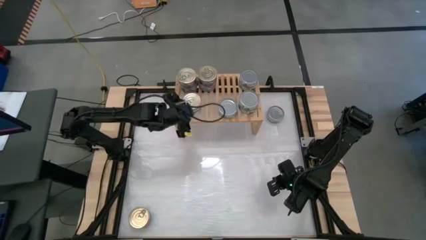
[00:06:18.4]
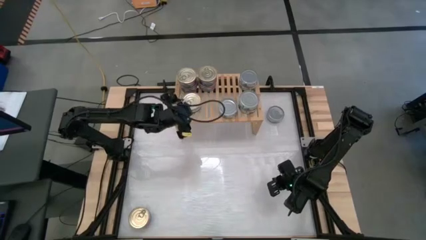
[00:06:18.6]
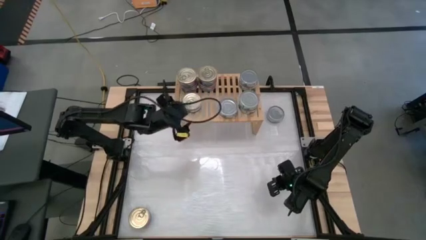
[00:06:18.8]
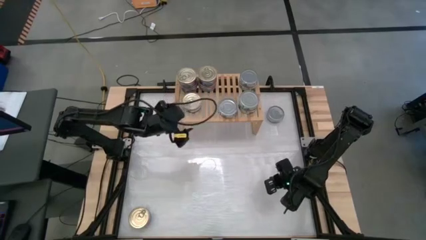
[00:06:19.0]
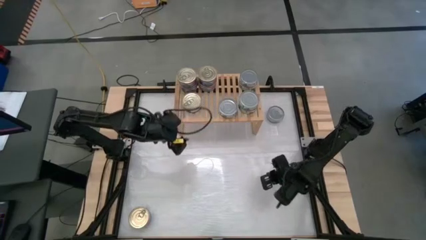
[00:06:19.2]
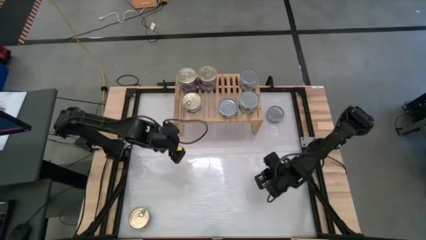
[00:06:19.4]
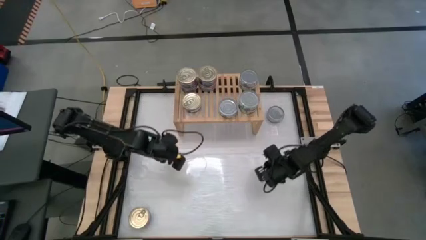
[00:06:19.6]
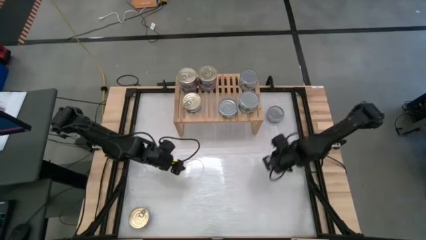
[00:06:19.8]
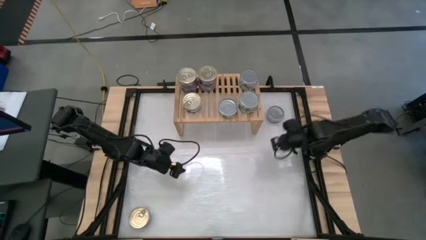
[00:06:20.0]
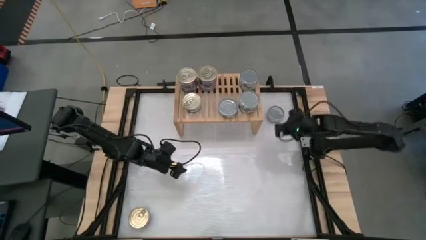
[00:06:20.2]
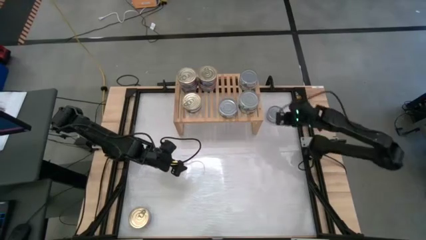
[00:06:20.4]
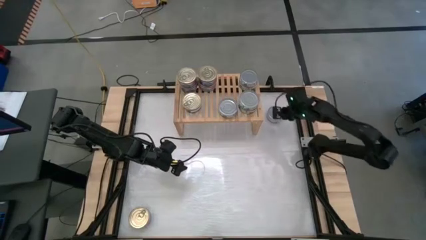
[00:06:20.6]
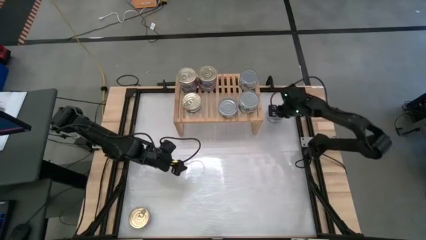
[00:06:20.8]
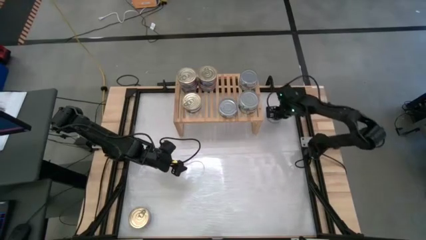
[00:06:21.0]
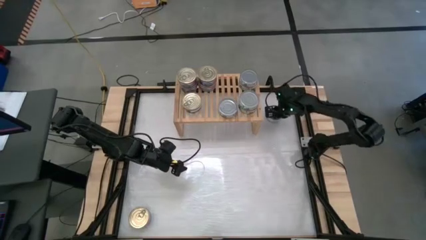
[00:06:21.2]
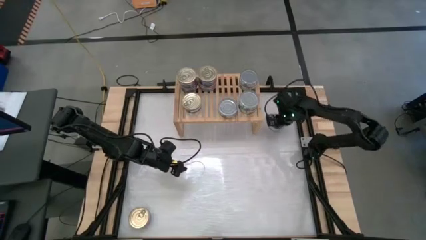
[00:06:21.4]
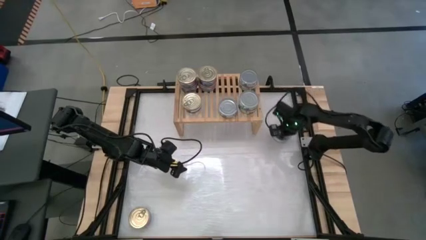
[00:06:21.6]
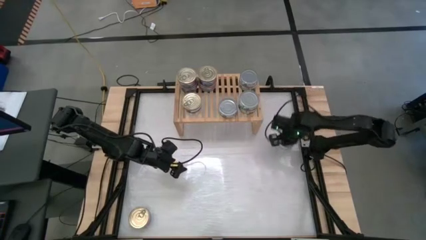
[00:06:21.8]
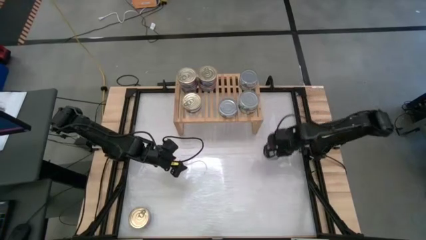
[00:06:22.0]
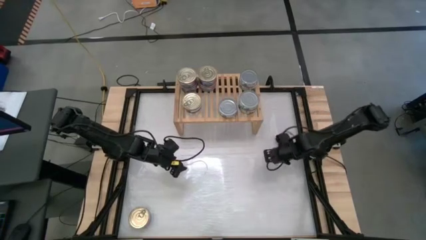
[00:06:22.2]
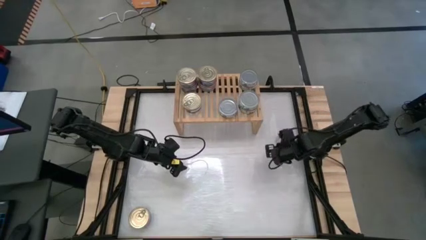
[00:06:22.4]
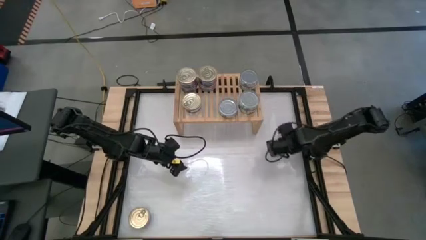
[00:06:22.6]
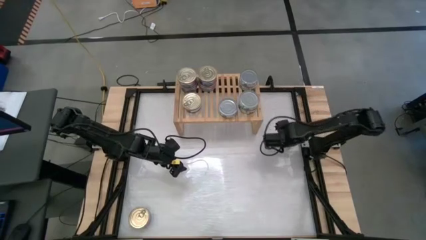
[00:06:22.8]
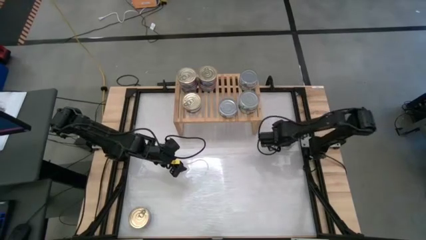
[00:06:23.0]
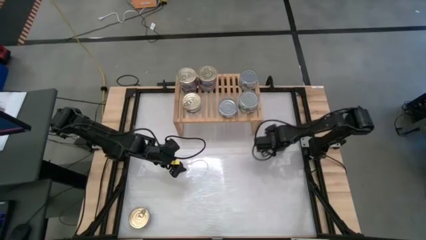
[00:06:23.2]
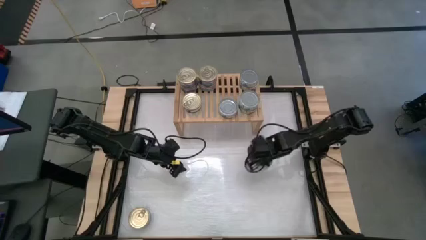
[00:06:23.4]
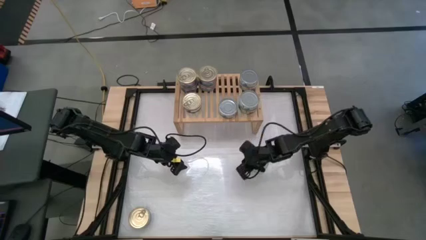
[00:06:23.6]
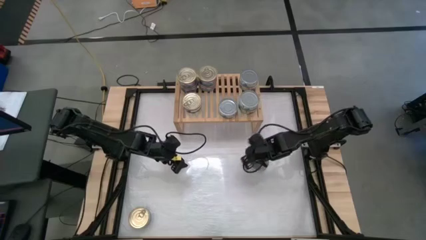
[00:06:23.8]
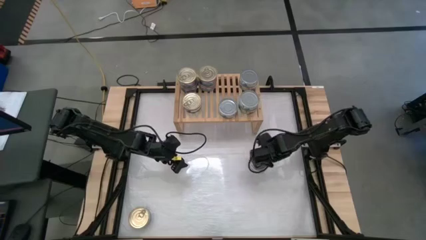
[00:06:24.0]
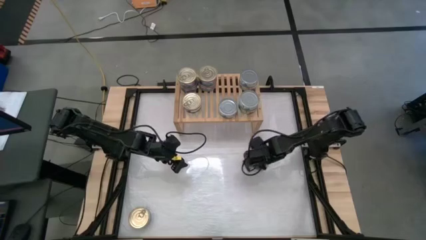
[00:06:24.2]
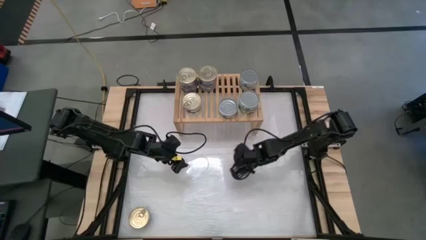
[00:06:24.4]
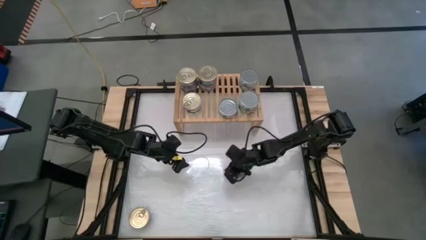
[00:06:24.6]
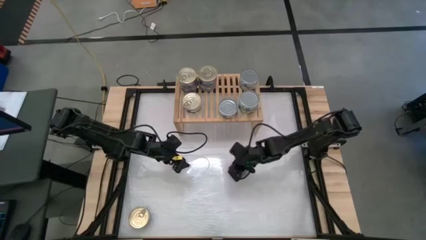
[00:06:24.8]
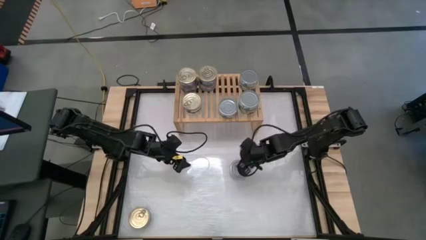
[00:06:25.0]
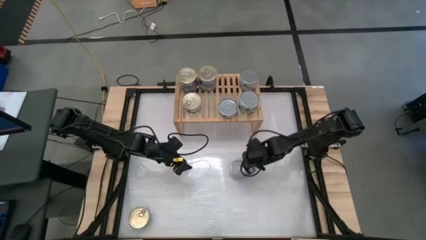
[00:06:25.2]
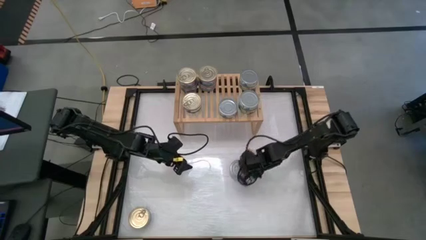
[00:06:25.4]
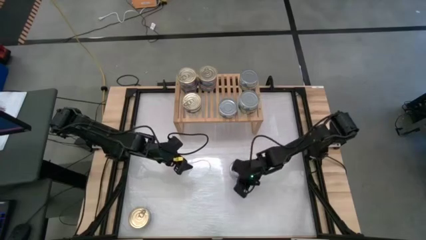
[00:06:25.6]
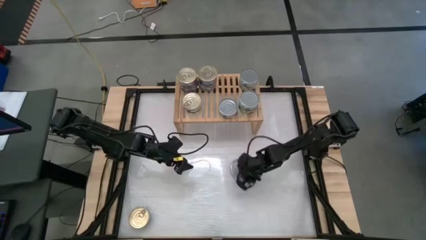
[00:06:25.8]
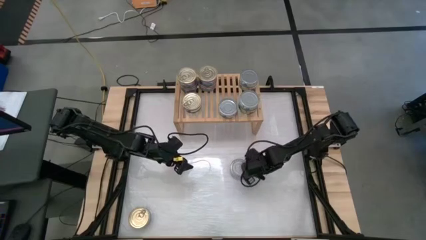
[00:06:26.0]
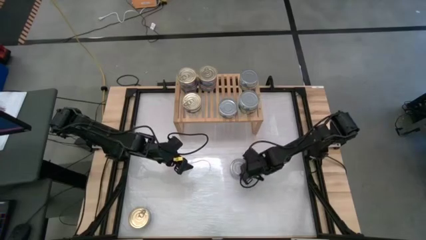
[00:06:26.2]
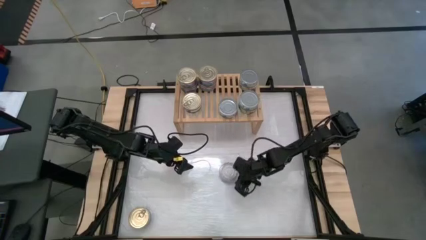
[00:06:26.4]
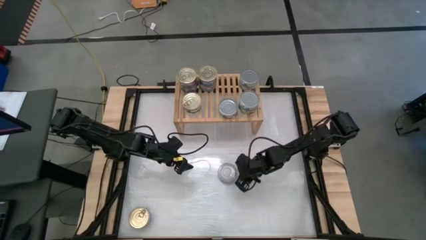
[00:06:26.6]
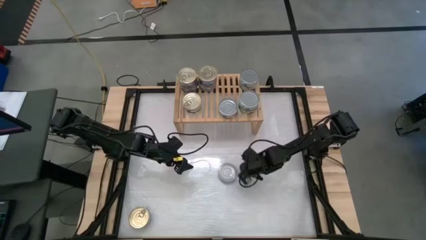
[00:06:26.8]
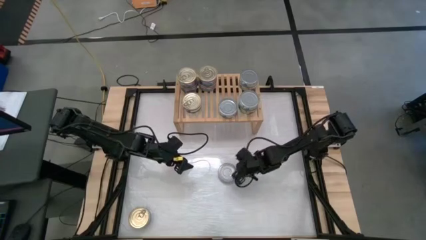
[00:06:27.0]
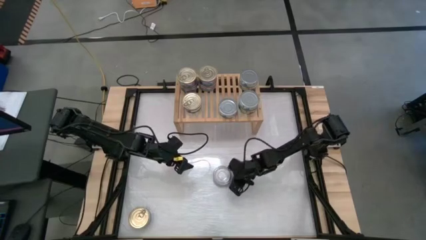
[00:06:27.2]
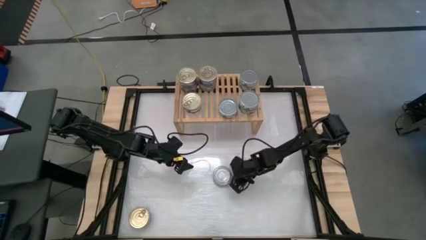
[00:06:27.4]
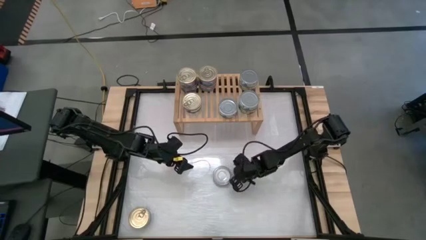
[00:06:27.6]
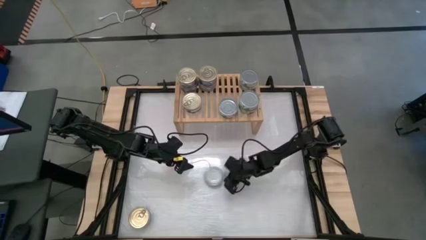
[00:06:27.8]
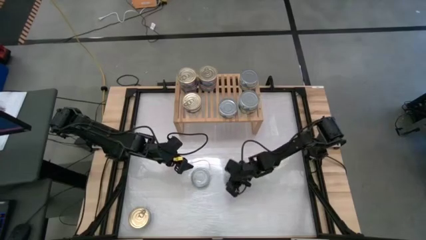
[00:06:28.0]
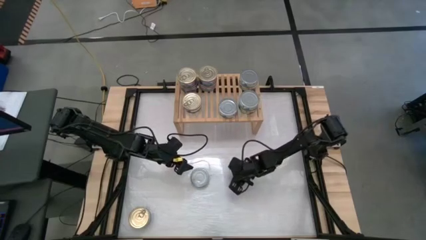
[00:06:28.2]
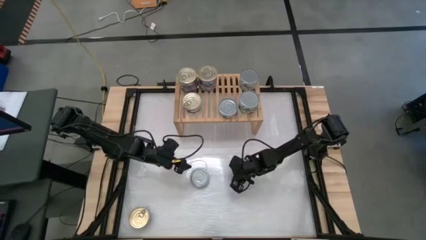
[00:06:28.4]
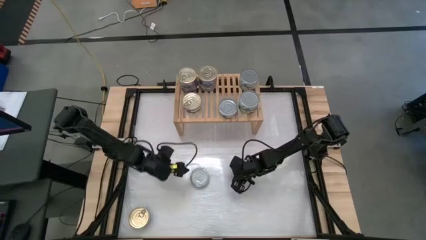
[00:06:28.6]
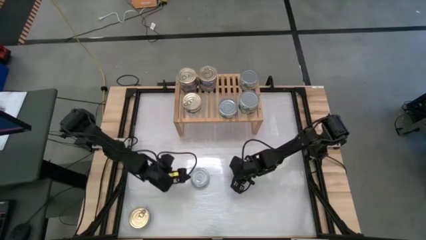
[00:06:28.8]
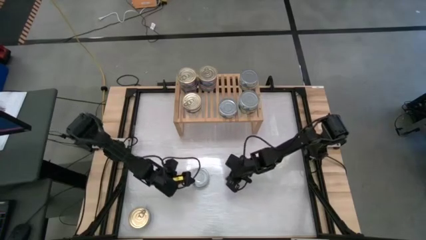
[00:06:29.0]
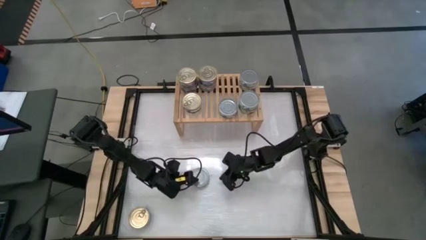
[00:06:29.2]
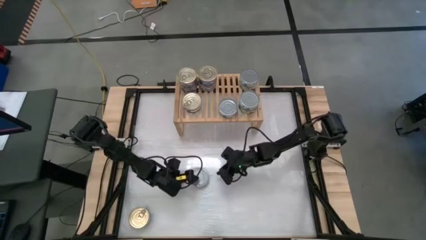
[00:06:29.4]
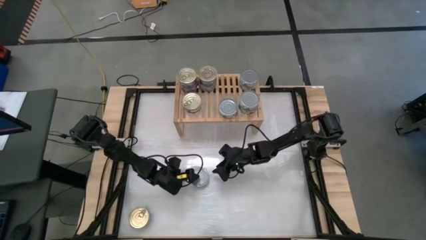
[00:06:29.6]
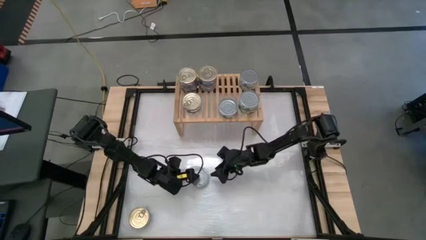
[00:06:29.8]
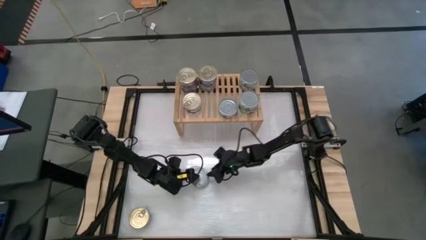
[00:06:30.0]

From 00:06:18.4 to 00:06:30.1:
Task: Stack canned seafood by type on shelf
Stack the green tuna can on top of the other green tuna can on the shelf
